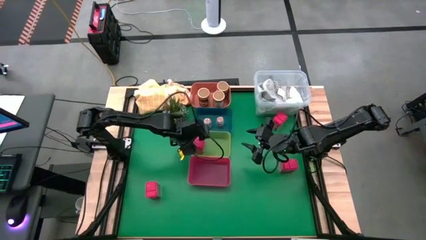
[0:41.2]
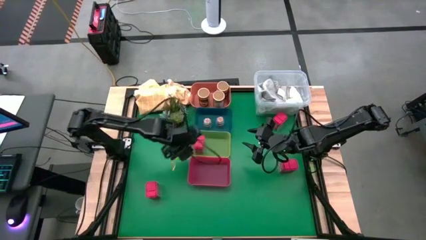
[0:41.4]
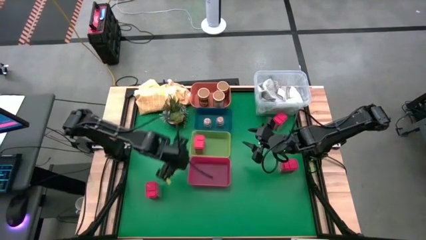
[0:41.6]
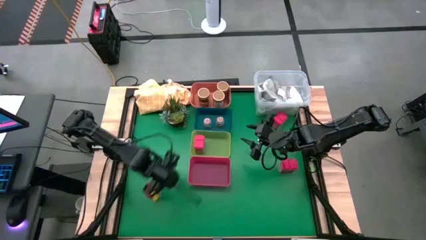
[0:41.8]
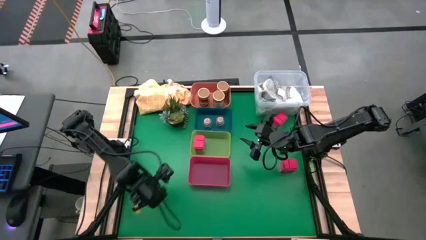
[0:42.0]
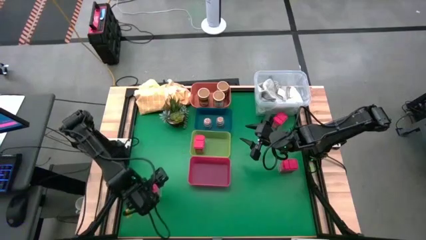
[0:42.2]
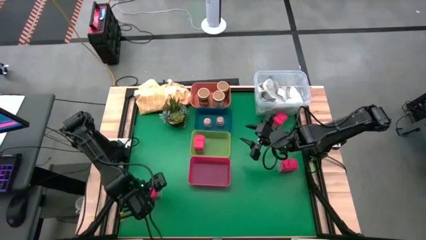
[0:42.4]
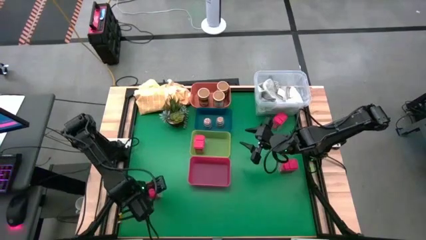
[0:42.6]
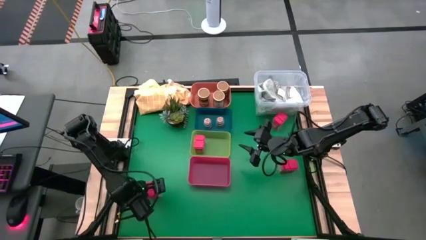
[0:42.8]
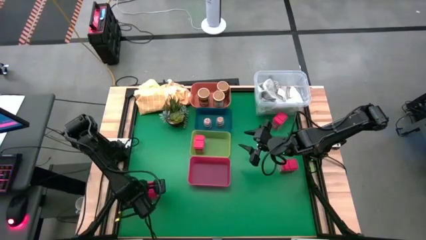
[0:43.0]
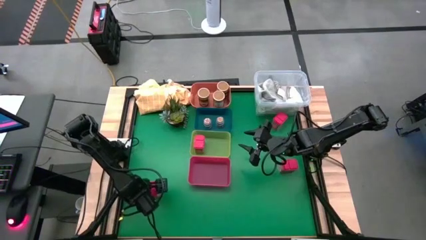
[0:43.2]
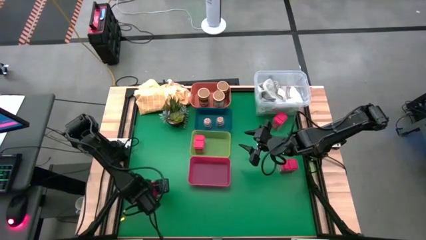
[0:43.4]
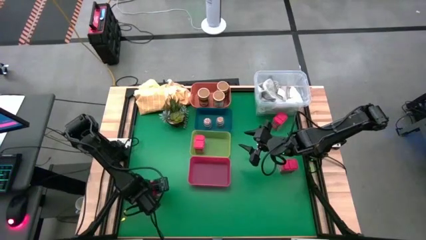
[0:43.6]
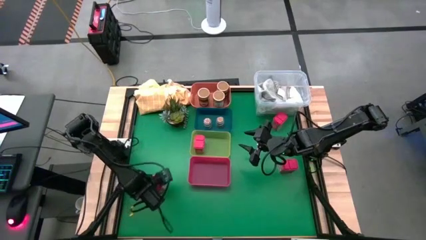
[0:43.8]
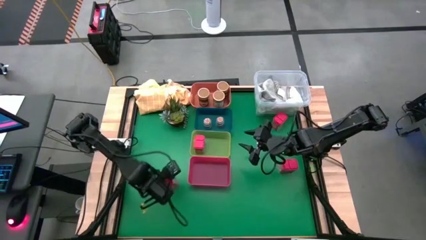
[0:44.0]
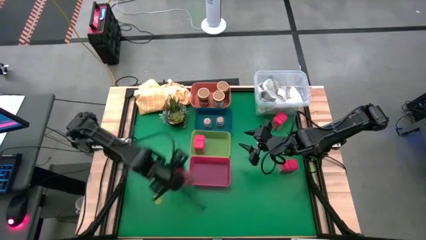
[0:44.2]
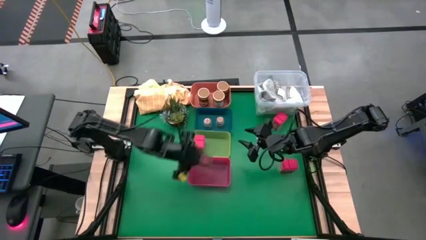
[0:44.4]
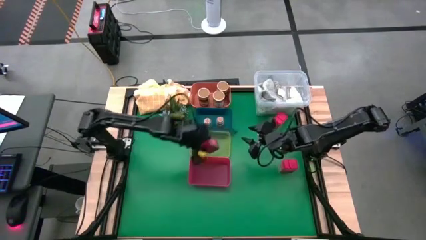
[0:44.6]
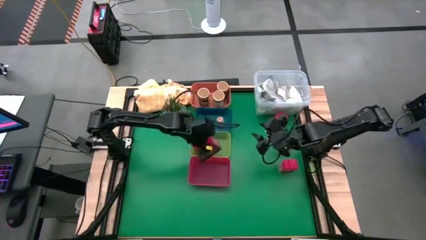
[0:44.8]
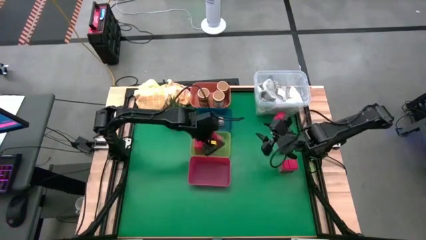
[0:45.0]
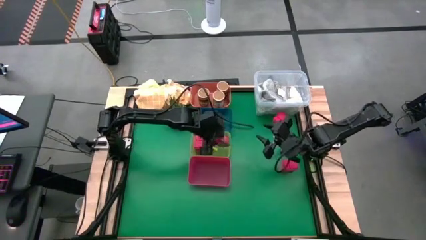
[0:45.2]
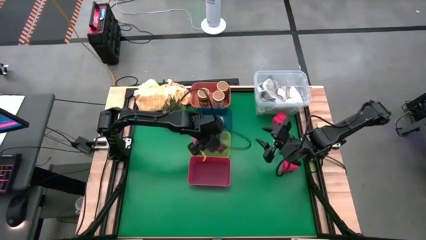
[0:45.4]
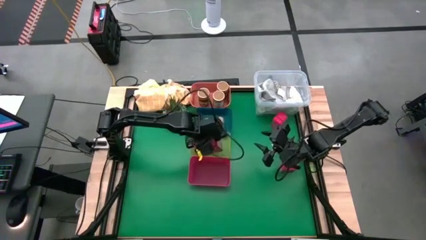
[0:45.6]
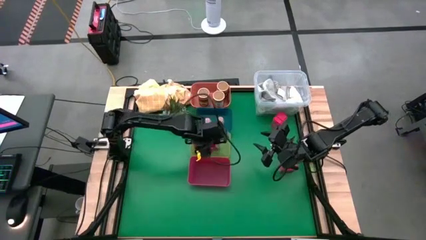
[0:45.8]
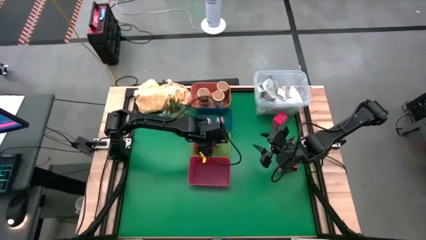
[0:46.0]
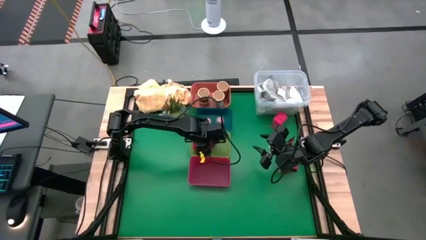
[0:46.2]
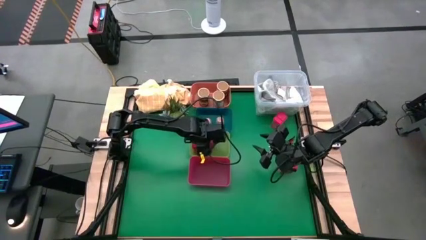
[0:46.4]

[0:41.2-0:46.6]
Task: Sort spices by type
Put the left red spice can into the yellow bin

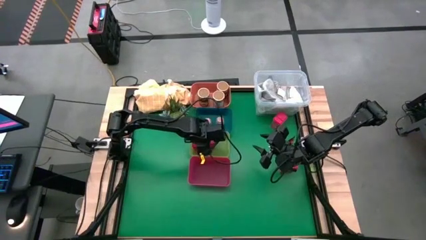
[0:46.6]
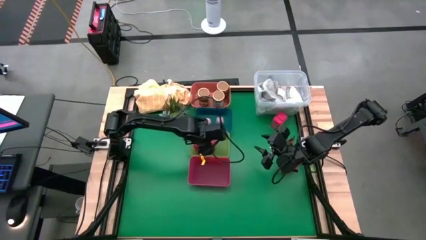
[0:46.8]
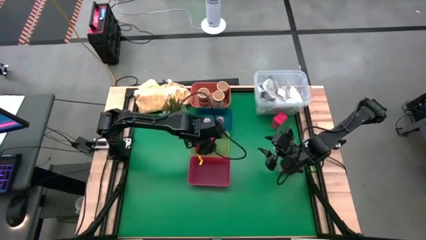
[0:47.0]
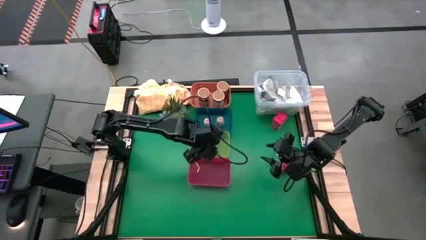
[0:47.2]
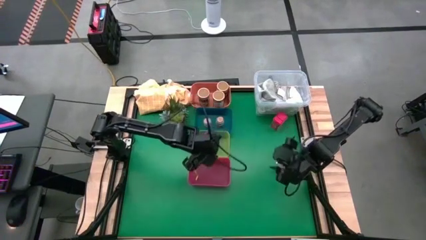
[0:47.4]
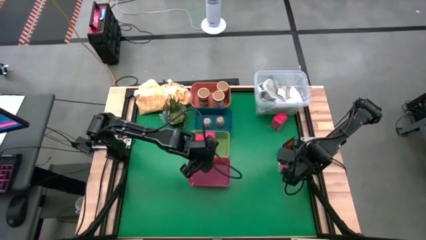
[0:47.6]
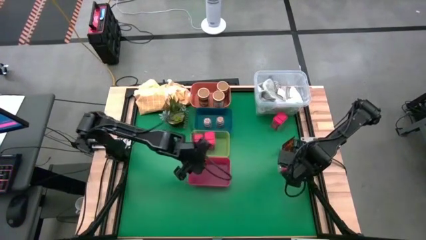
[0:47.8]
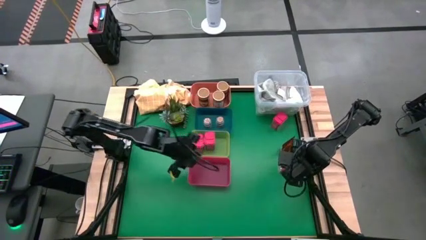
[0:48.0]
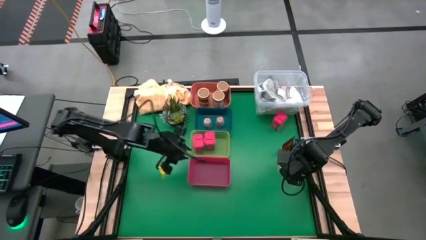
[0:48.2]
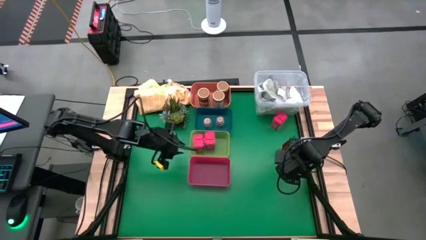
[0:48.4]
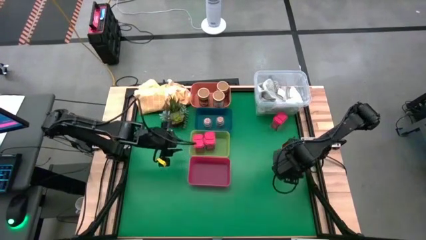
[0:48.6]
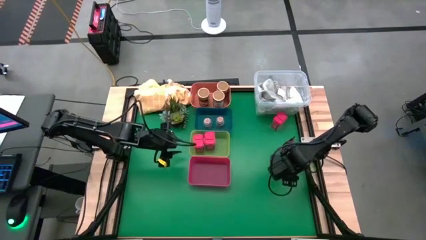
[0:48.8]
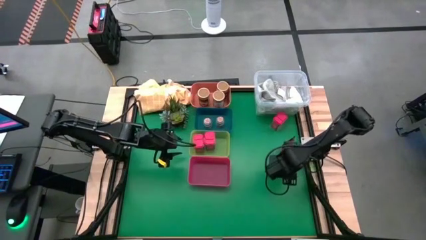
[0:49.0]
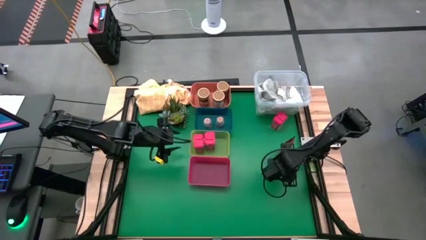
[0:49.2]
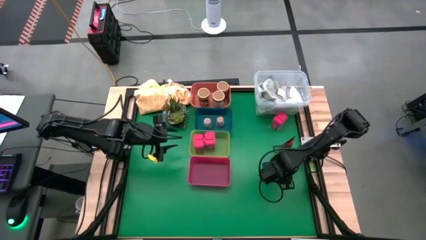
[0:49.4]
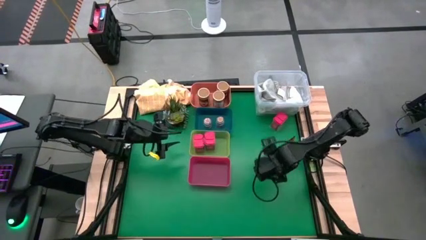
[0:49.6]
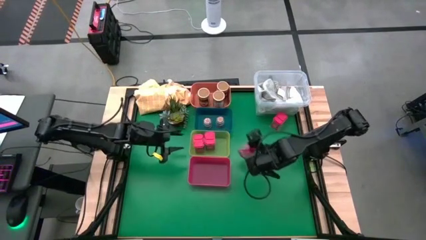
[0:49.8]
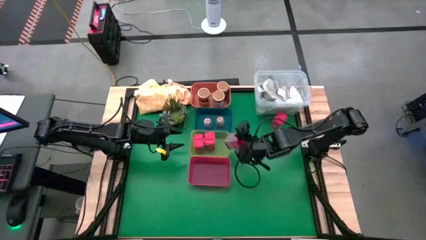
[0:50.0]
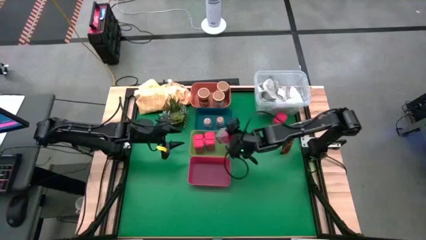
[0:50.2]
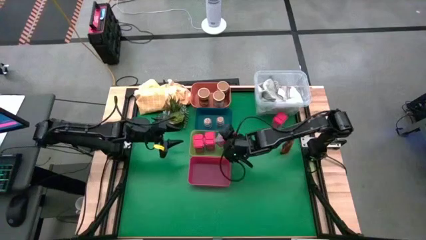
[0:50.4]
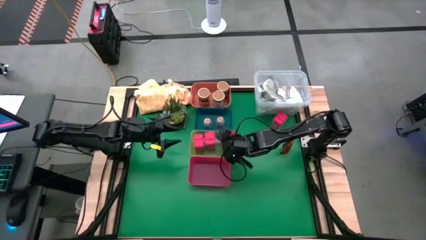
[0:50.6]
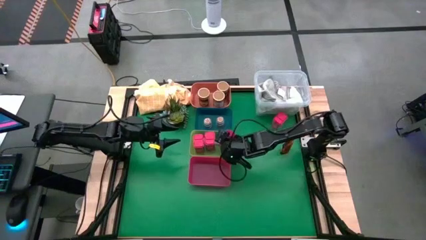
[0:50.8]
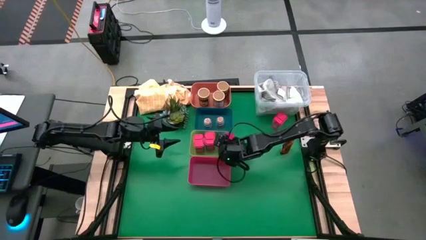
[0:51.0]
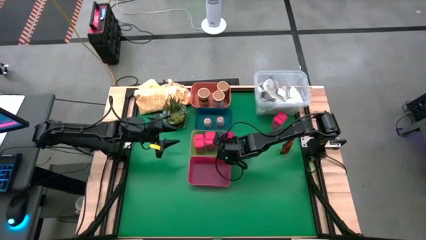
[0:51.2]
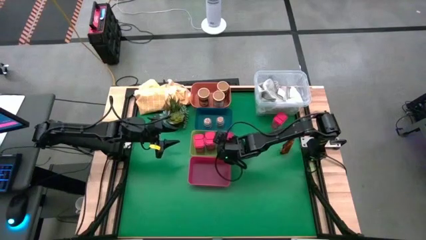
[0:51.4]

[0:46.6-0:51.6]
Put the bottom red spice can into the yellow bin

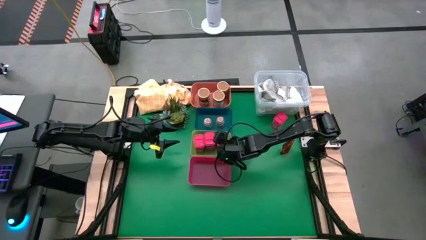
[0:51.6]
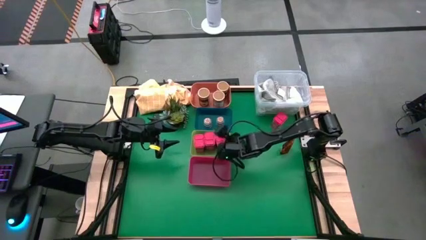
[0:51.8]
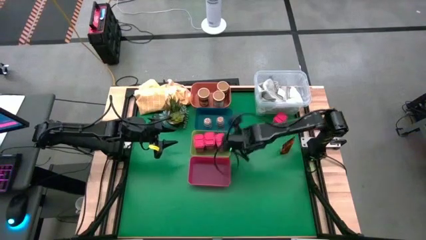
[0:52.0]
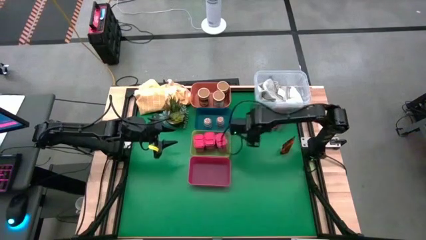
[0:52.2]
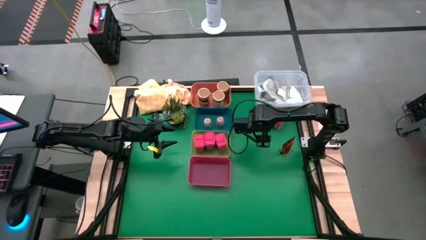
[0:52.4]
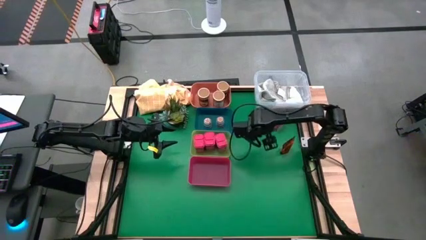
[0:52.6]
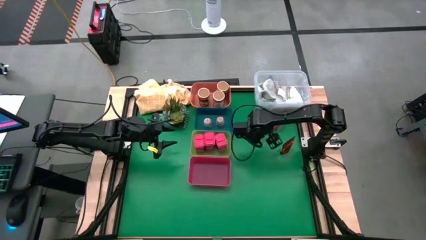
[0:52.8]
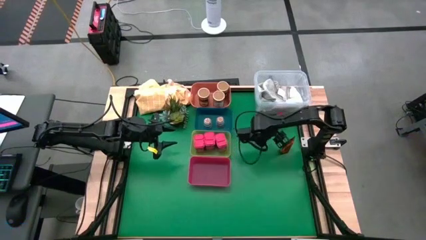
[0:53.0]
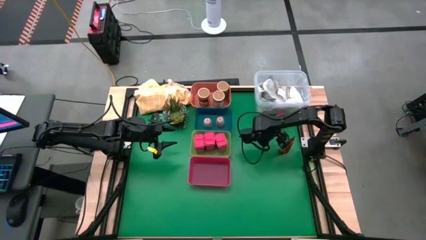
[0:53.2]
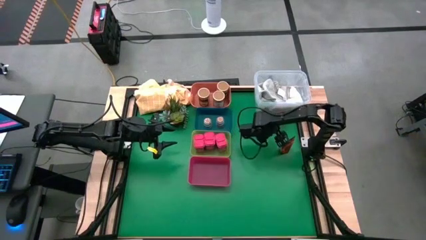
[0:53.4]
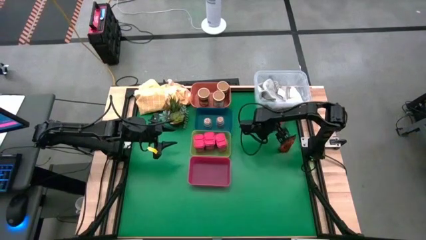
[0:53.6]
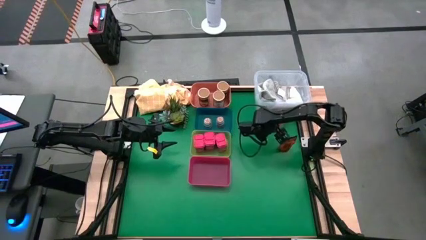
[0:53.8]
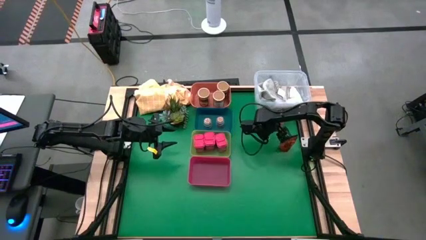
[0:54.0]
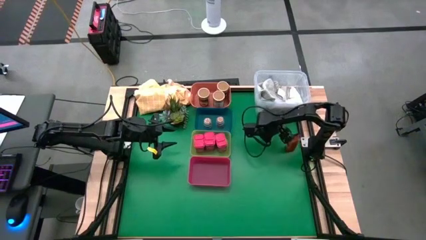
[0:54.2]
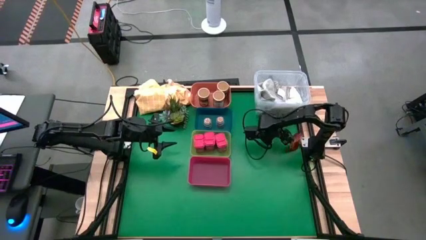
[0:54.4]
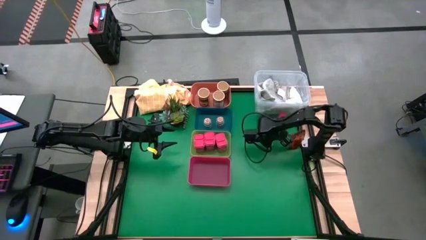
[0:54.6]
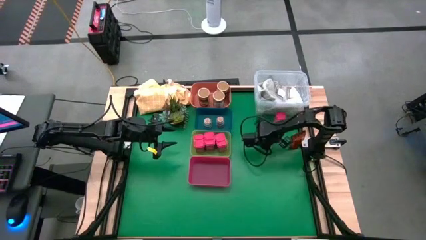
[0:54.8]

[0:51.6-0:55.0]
Put the red spice can into the yellow bin

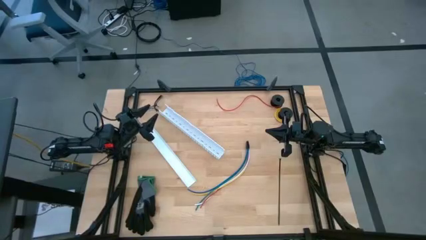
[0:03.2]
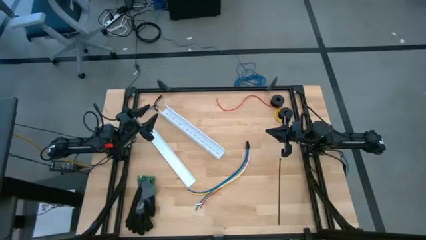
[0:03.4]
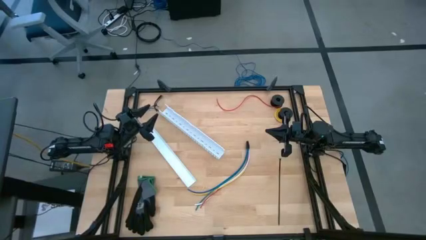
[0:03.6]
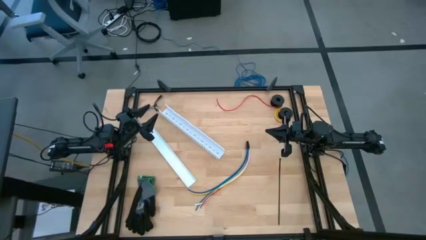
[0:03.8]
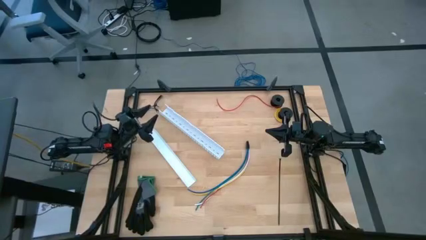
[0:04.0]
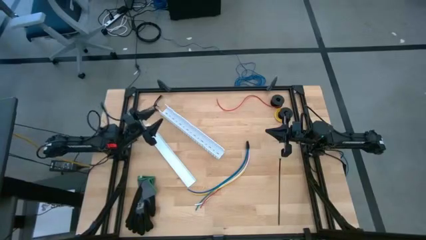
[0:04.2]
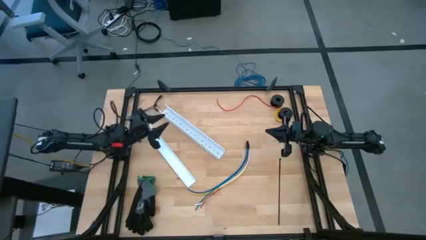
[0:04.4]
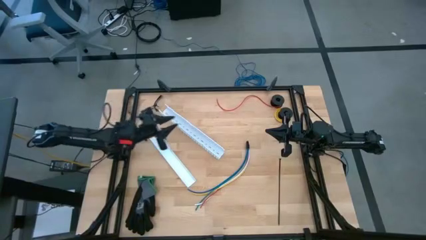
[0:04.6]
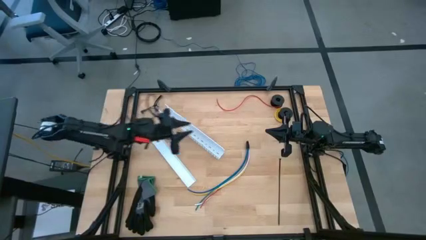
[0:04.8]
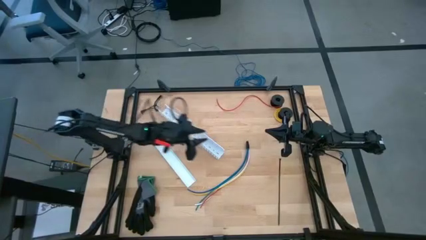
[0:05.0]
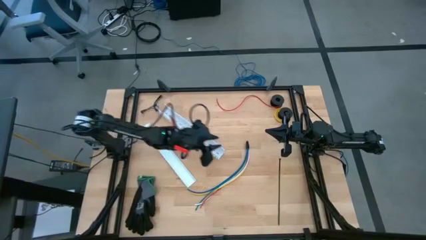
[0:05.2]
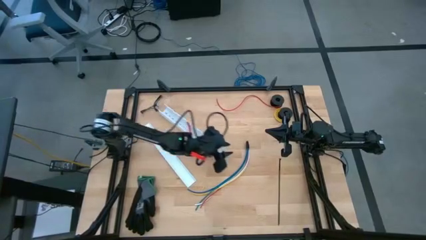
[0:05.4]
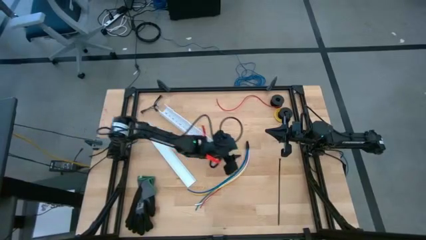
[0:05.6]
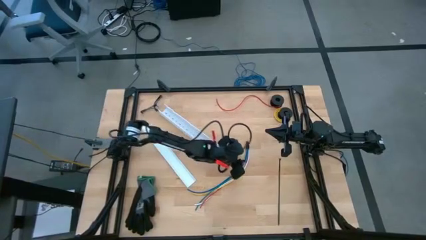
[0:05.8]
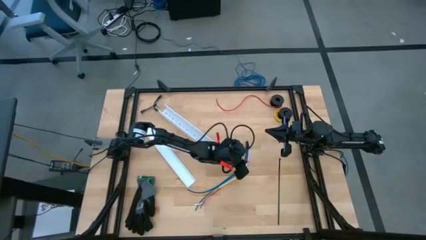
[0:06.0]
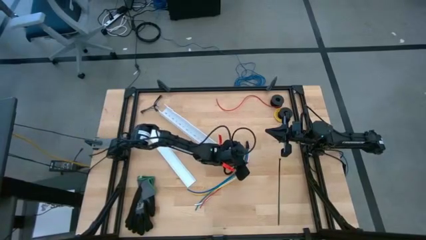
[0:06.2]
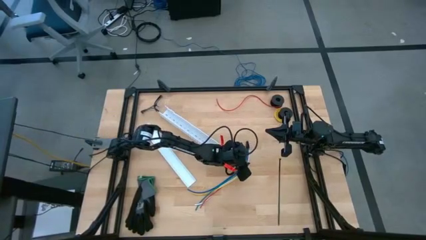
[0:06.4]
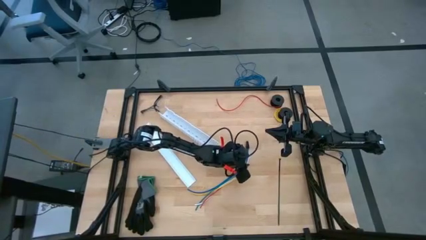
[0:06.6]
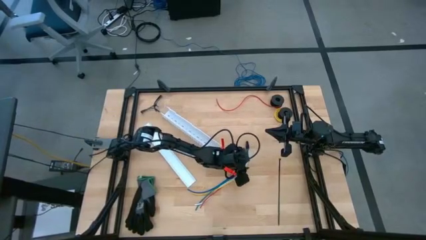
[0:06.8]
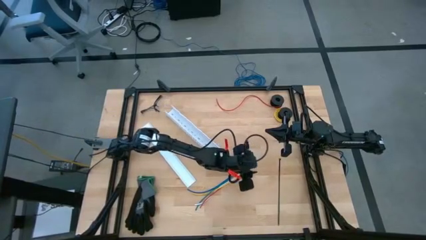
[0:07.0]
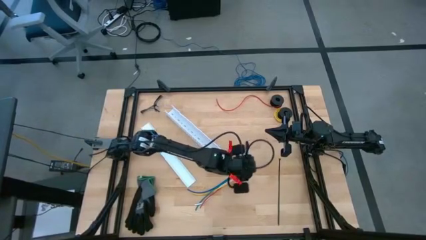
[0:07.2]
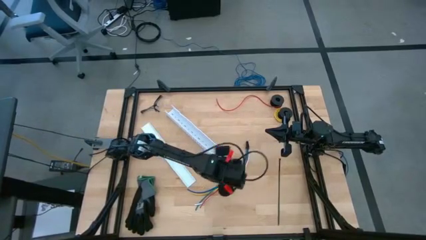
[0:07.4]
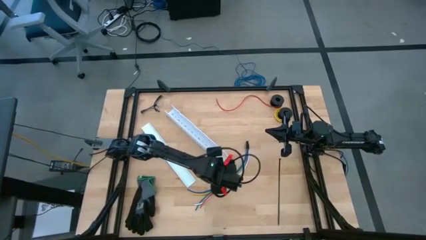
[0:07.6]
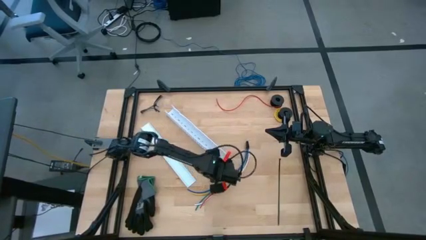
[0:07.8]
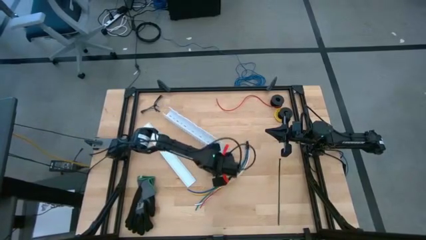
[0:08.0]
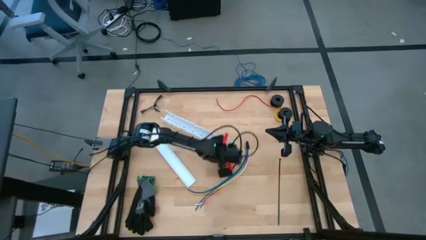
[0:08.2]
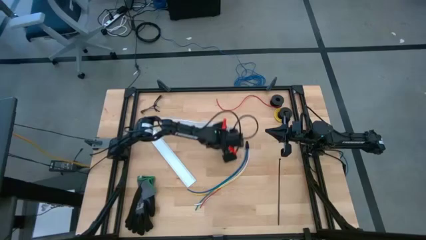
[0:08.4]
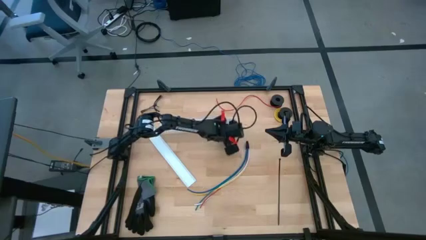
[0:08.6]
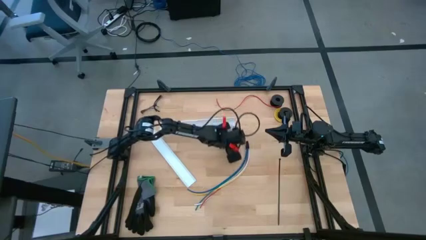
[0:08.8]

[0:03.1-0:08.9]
Task: Ziptie cables
Adjust the white cable duct
